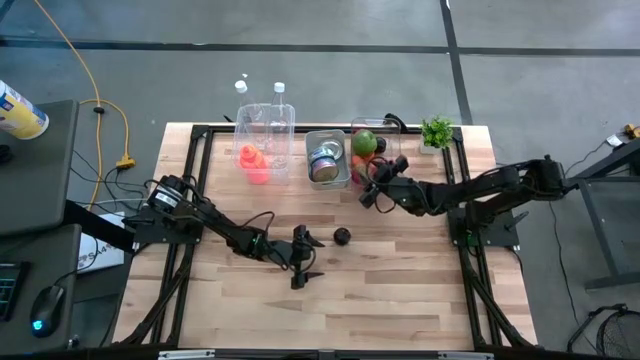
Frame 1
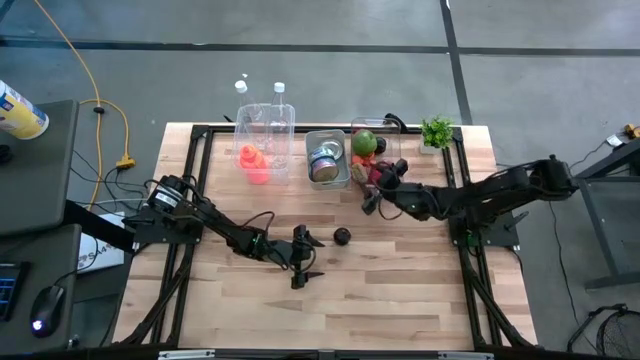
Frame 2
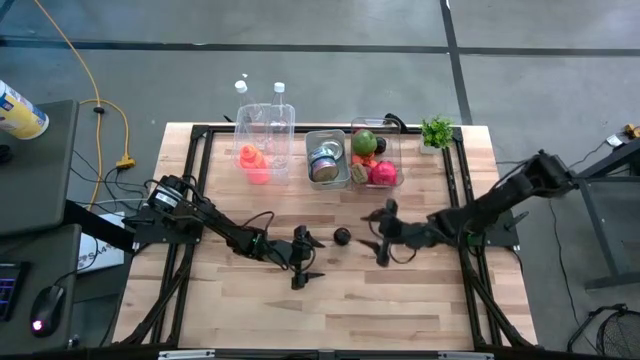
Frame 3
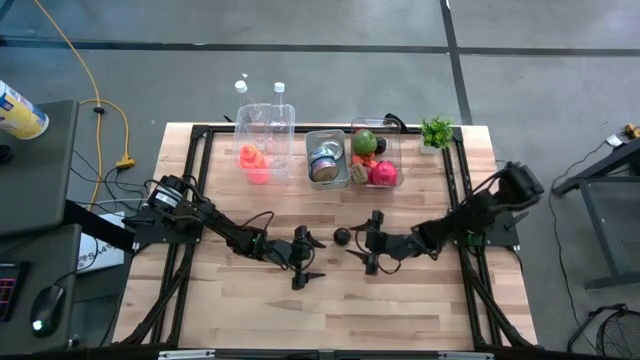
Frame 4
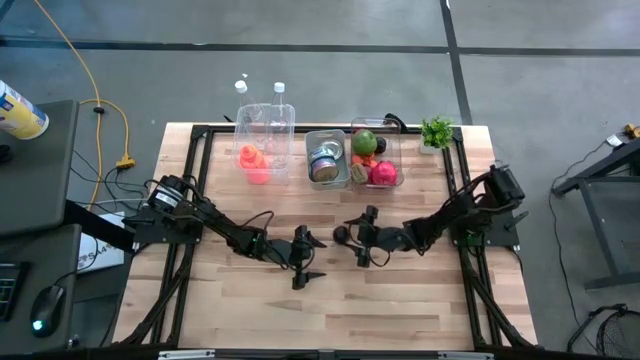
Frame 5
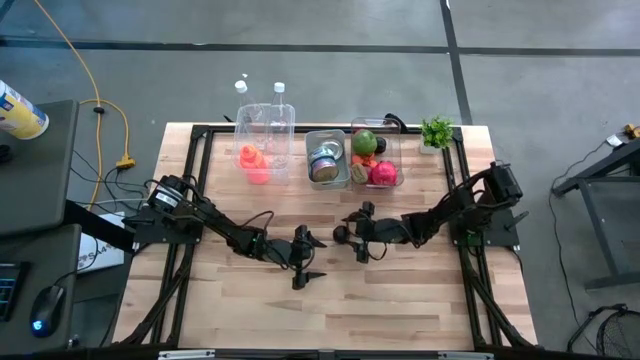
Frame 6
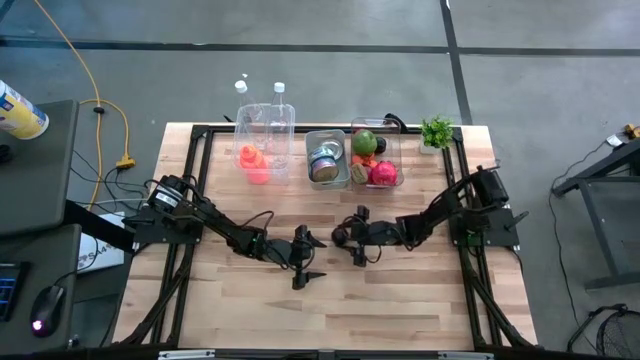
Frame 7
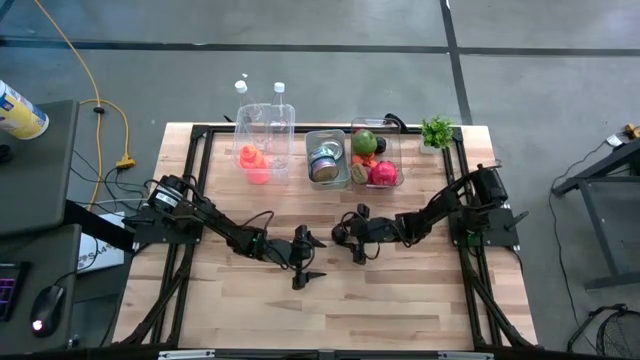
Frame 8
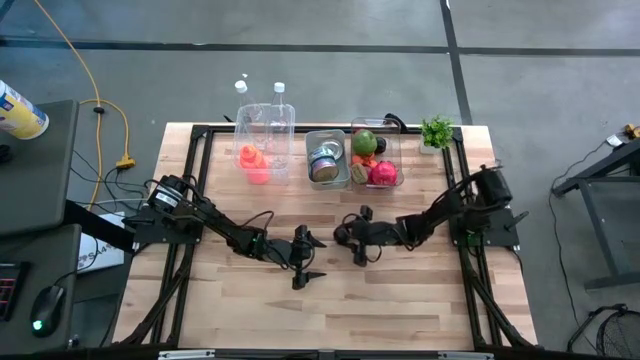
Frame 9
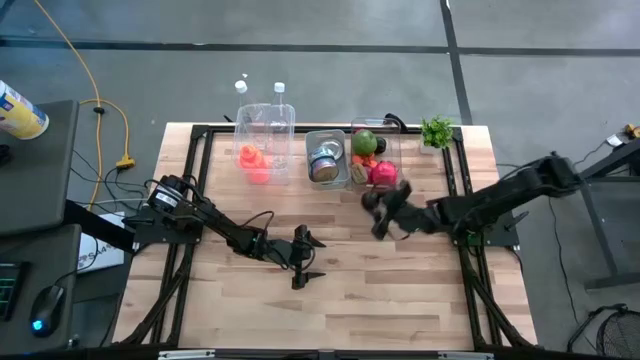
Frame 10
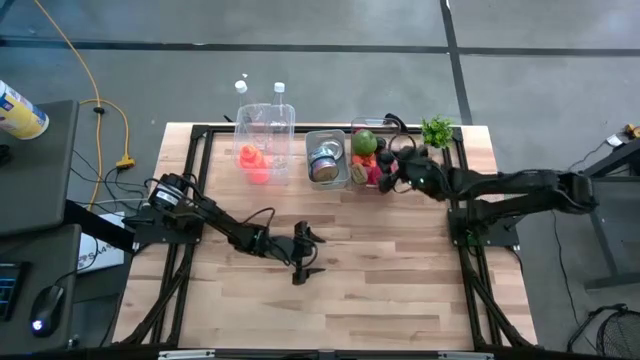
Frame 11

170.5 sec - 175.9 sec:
Task: Pick & Place Food Item
Put the plum into the transparent bin

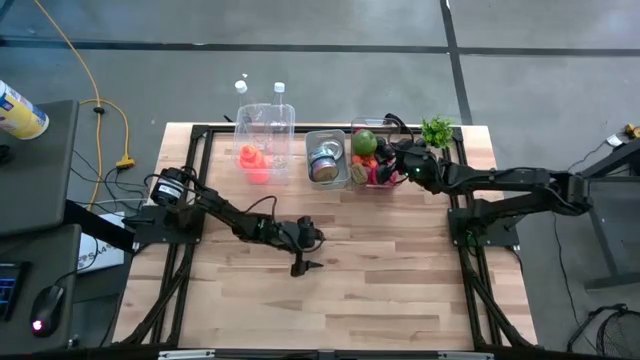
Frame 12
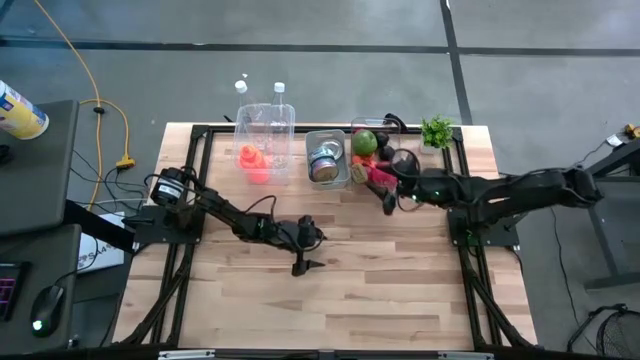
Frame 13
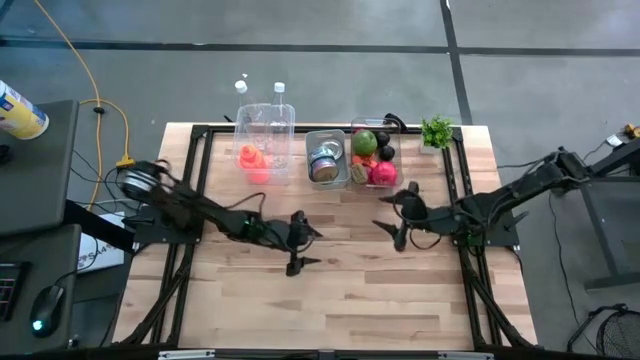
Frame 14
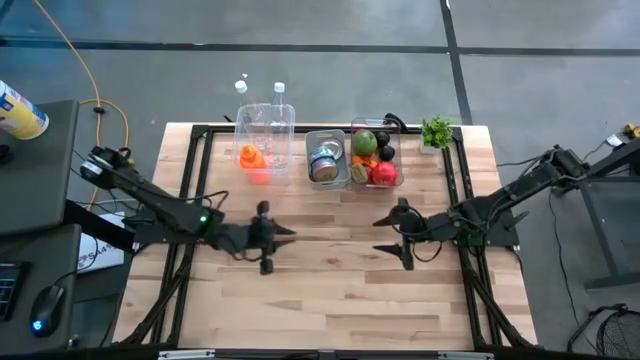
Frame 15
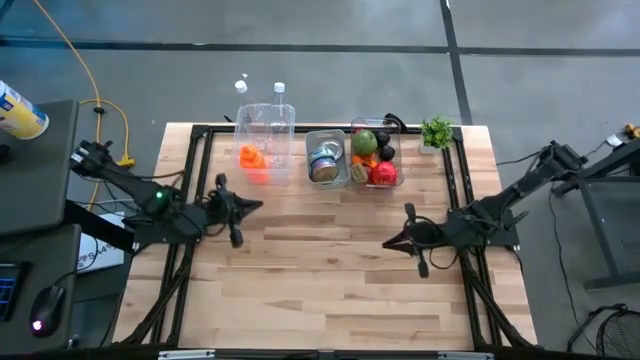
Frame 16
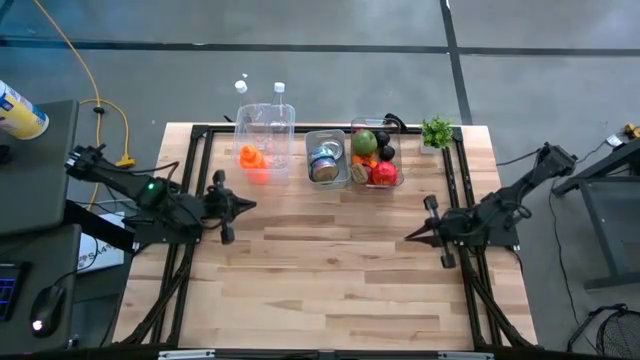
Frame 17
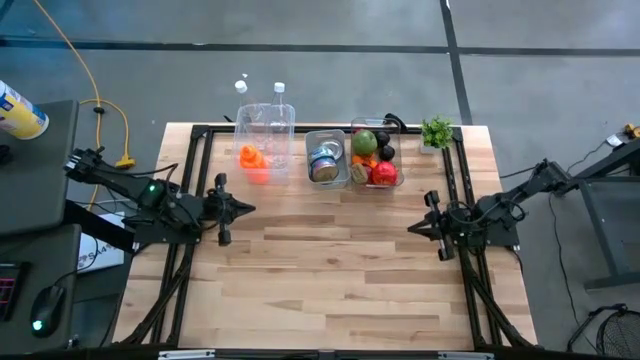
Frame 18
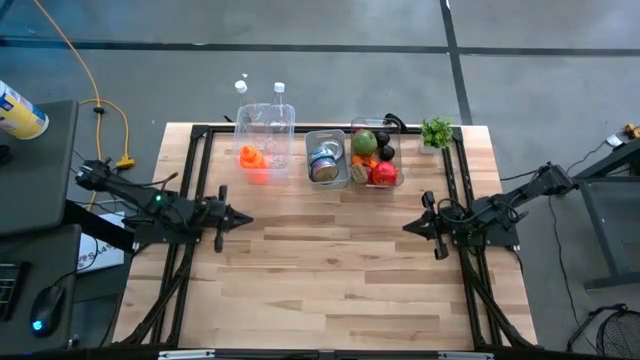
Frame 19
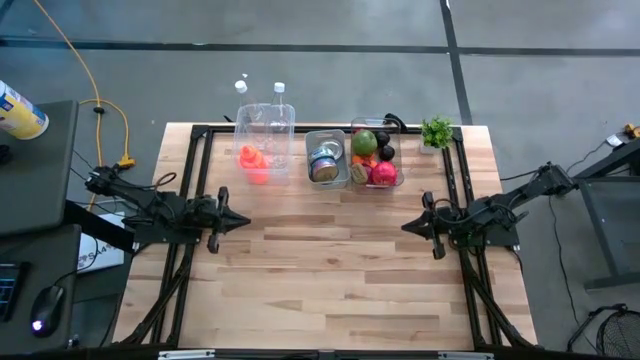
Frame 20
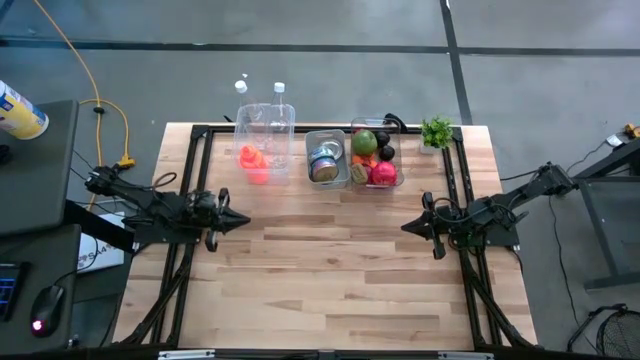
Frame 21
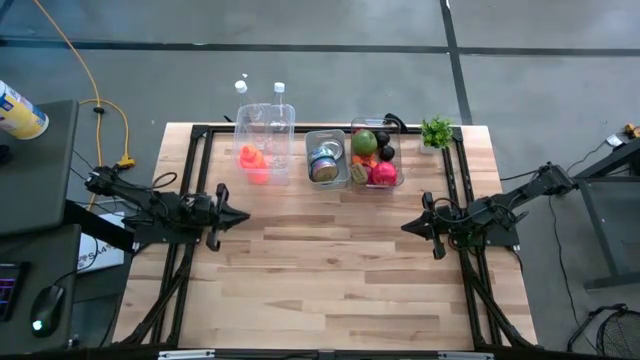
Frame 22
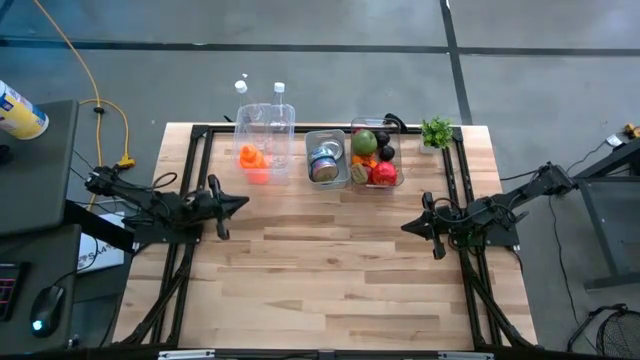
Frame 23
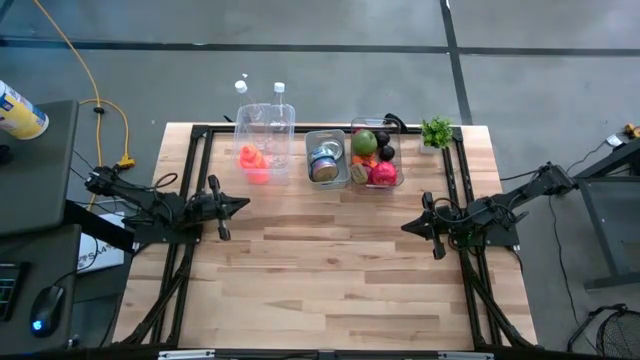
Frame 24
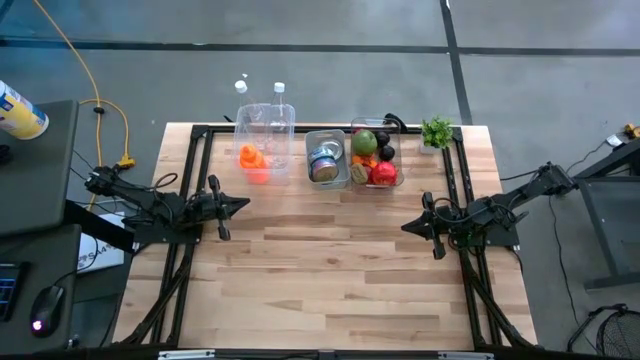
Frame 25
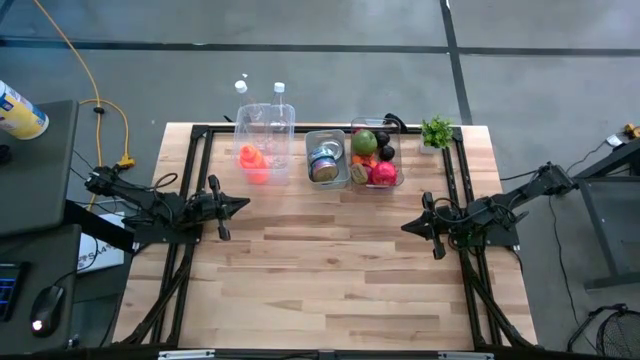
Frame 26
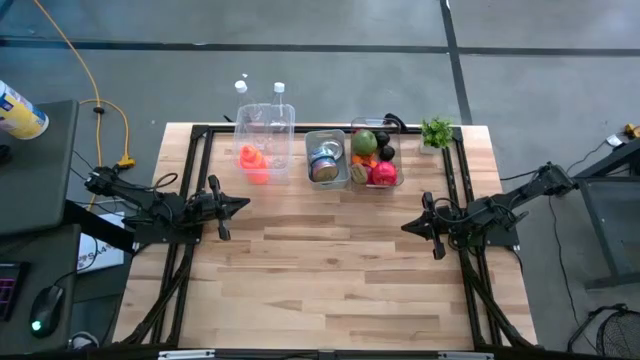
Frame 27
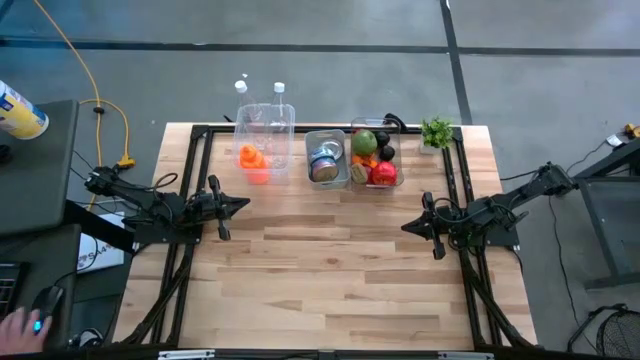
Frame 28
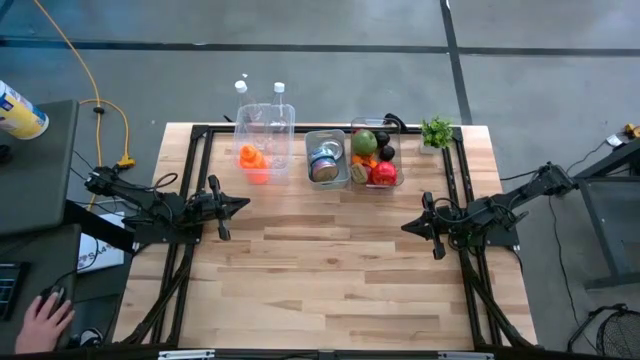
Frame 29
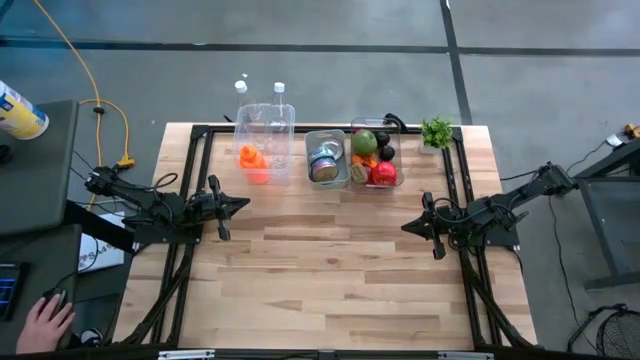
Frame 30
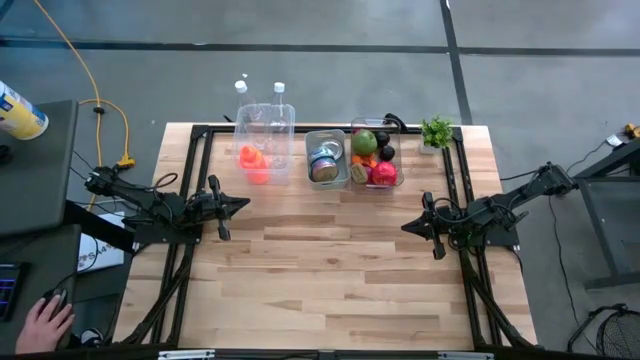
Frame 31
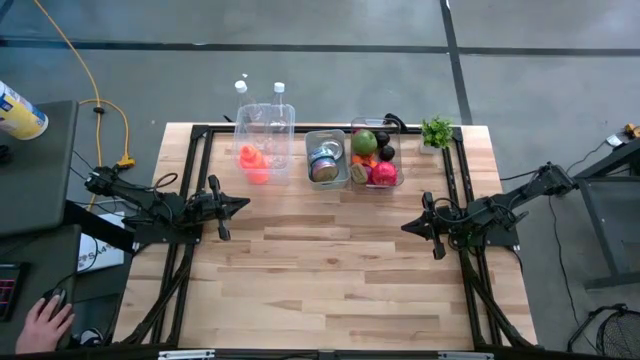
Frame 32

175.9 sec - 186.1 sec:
Return to Home Position

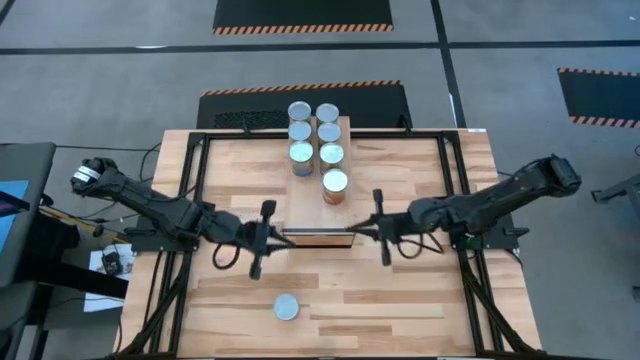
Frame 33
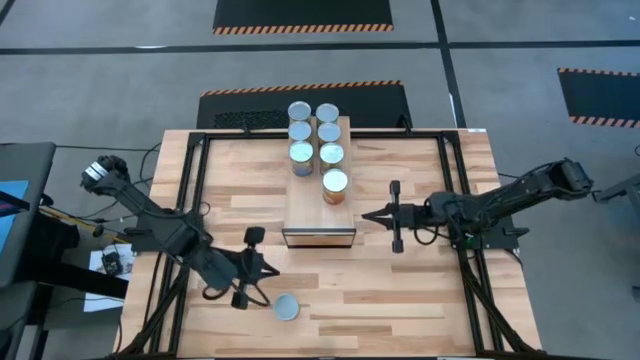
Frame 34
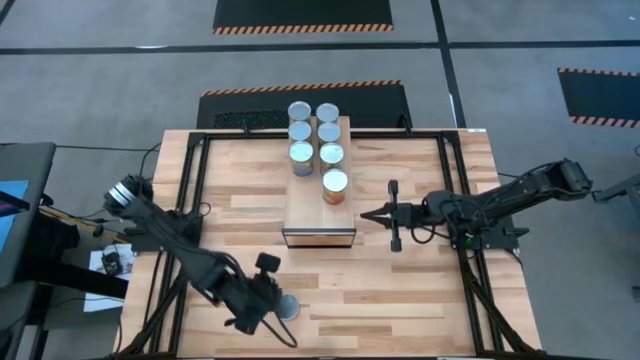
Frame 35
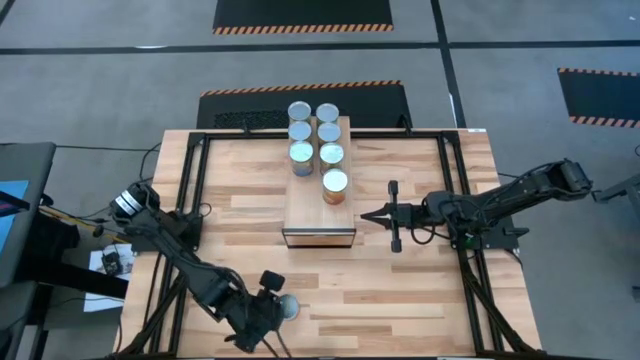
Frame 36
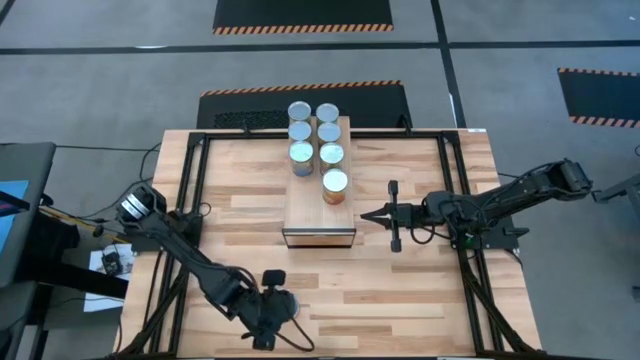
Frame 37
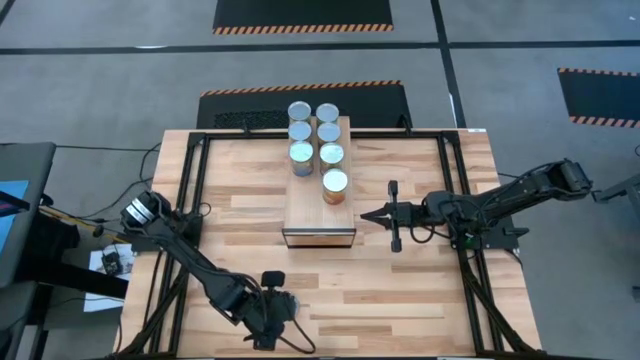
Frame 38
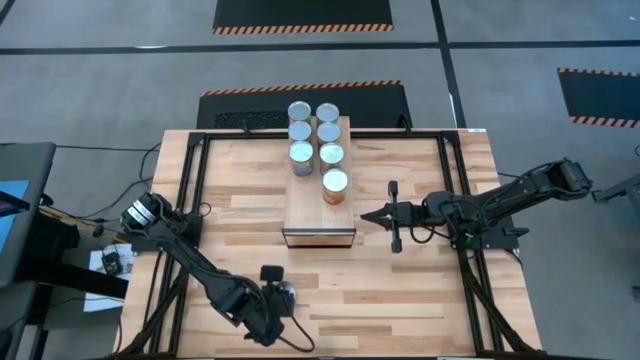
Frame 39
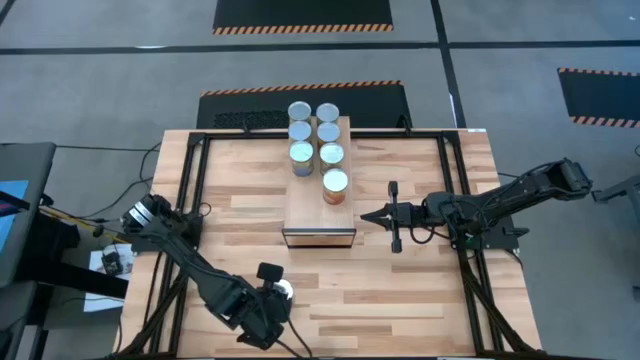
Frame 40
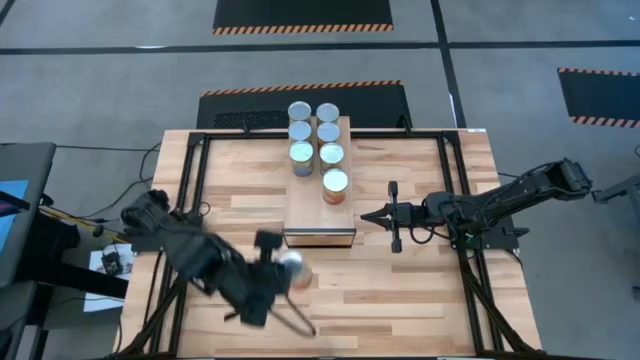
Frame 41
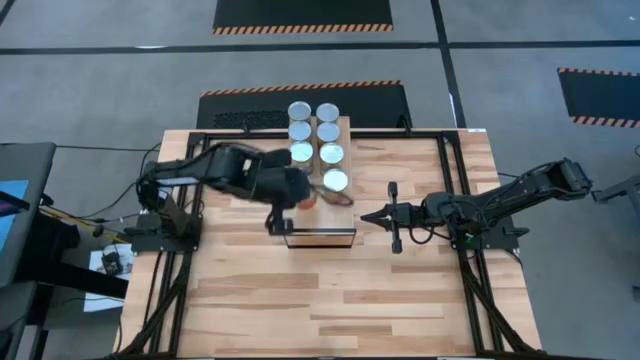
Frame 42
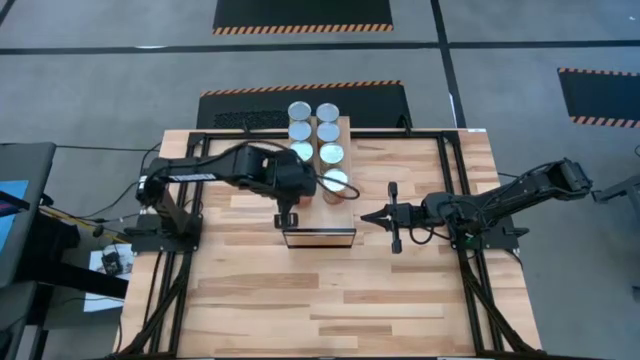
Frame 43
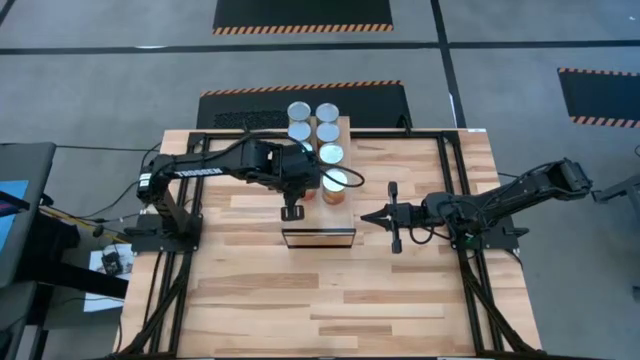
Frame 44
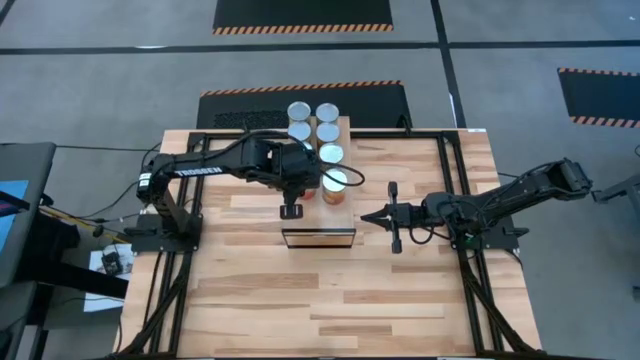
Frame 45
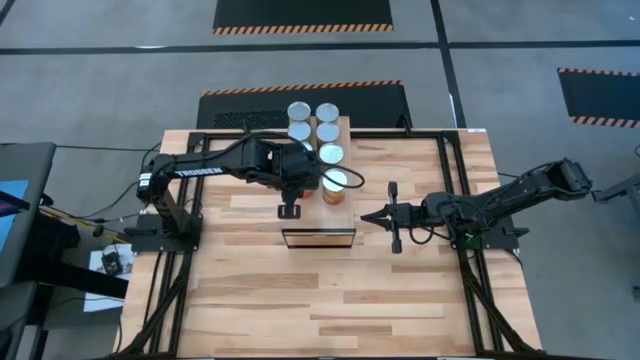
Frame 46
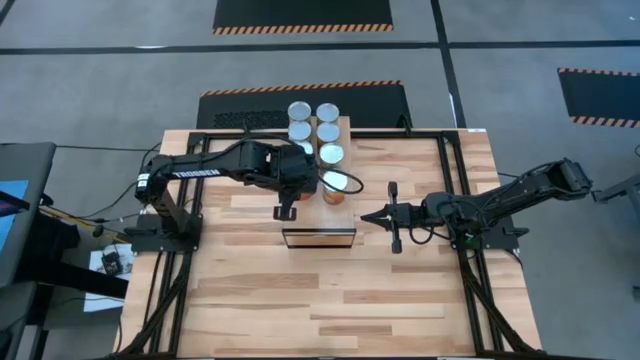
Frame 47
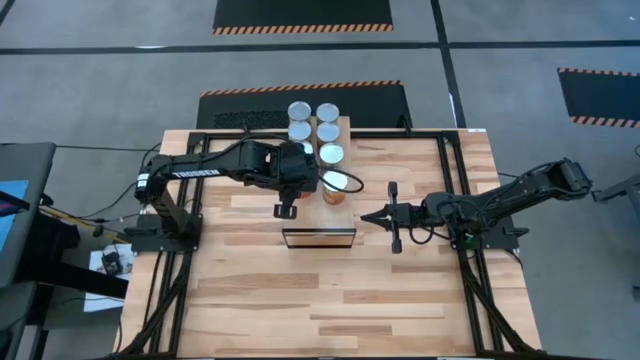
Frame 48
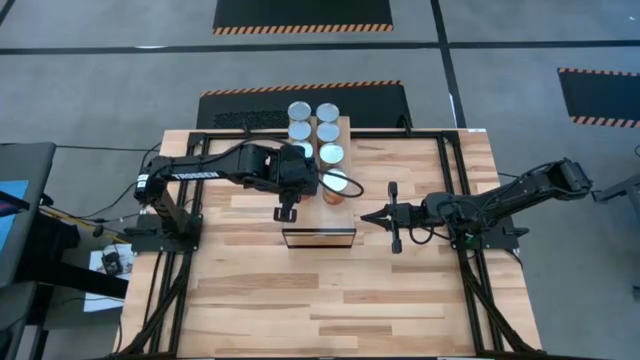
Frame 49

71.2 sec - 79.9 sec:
Task: Pick and place cans onto a shelf
Put the canned corn on the shelf aligned with other canned corn
